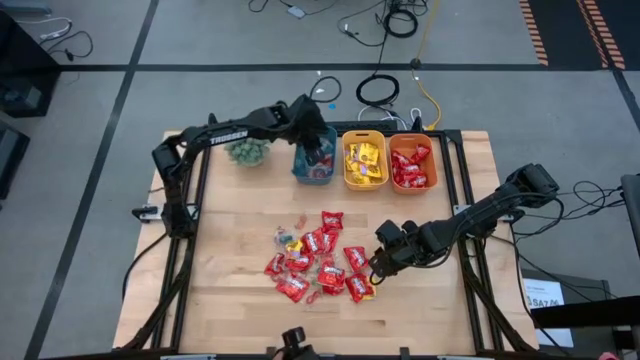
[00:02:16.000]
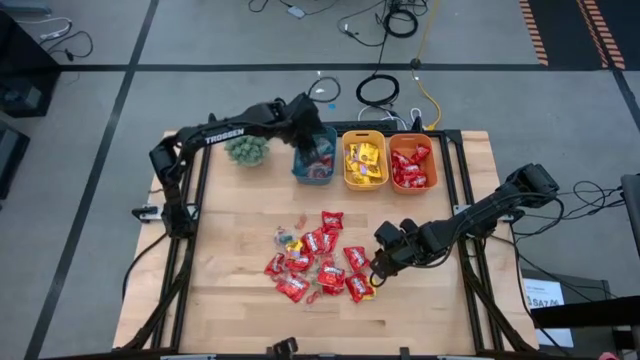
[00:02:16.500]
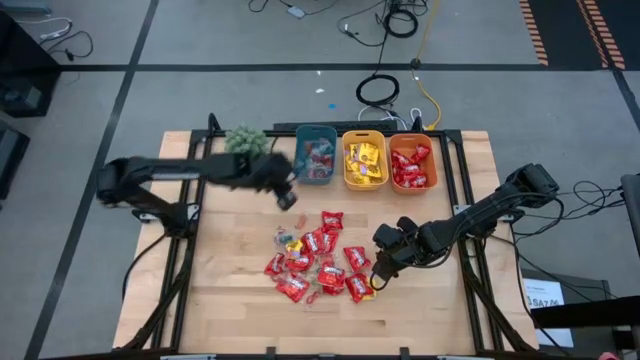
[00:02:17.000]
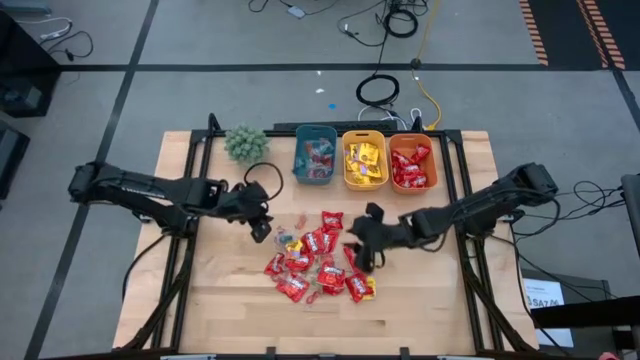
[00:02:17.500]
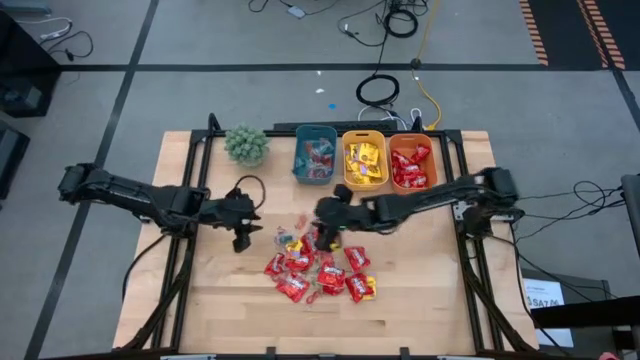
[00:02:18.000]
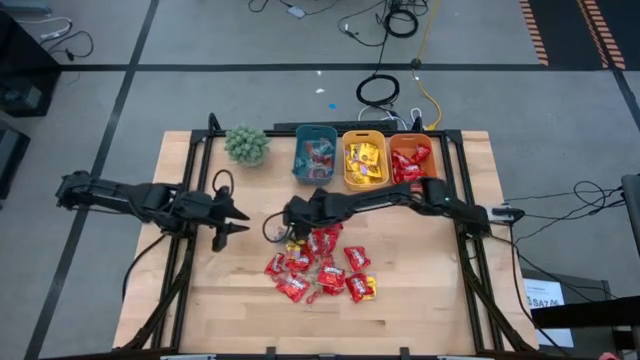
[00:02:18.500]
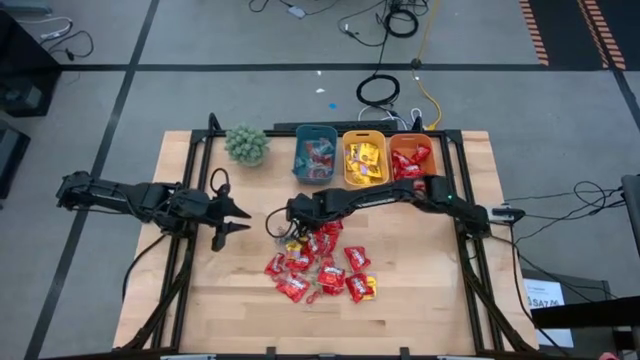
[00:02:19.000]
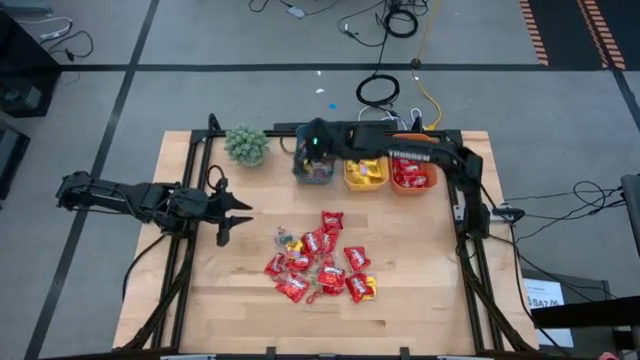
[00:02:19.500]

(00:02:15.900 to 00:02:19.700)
Task: Sort candy
Put the orange gummy into the blue bin

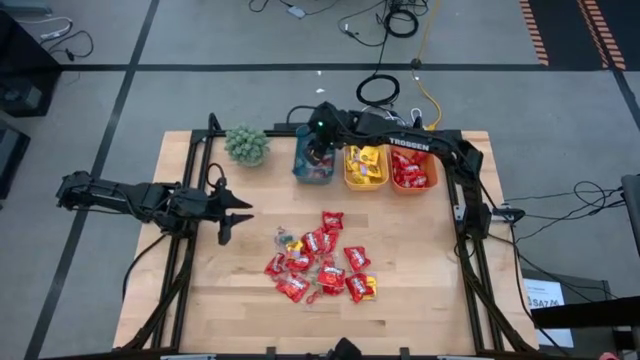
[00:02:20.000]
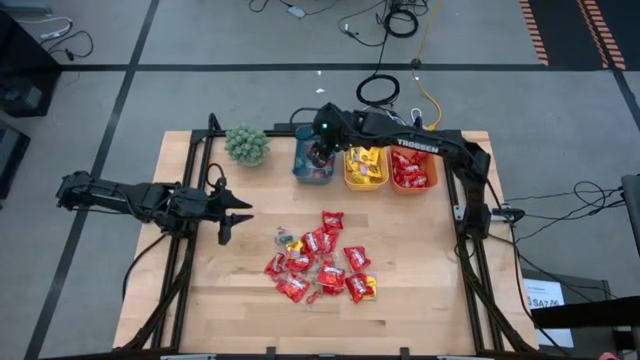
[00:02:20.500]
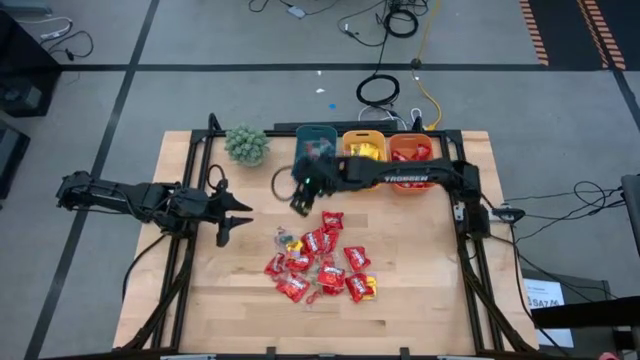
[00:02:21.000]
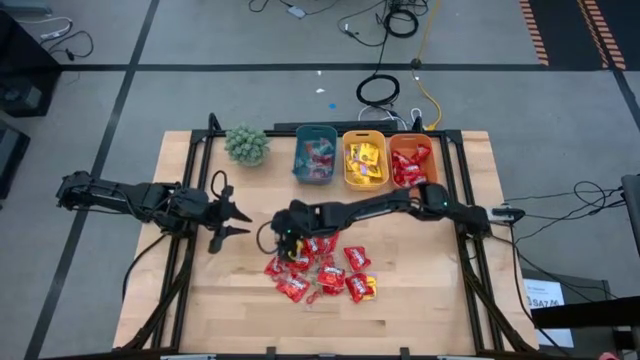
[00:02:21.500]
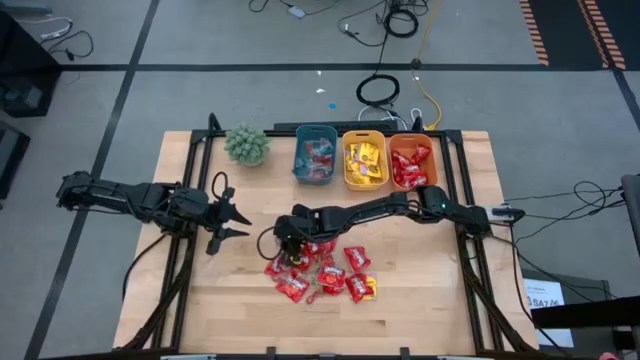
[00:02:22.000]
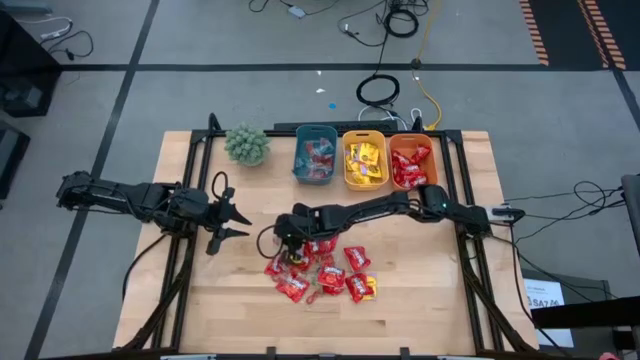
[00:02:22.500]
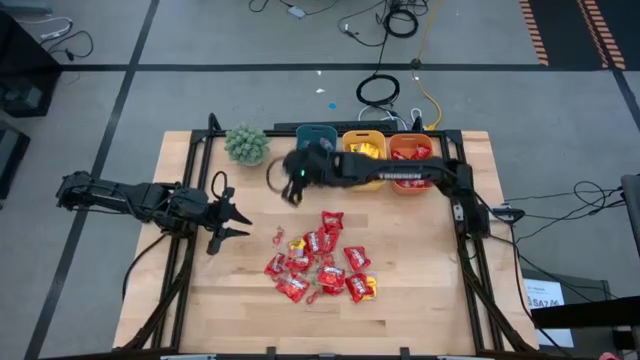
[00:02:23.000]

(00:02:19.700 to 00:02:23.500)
Put the blue gummy into the blue bin

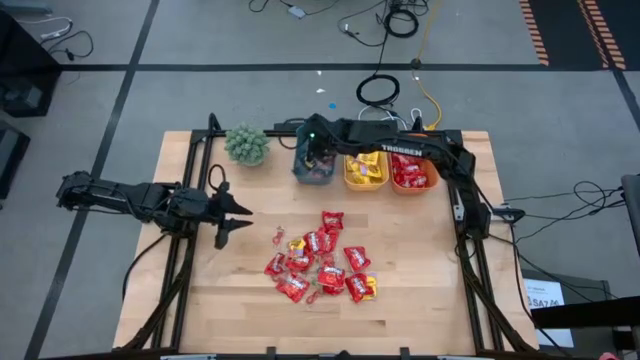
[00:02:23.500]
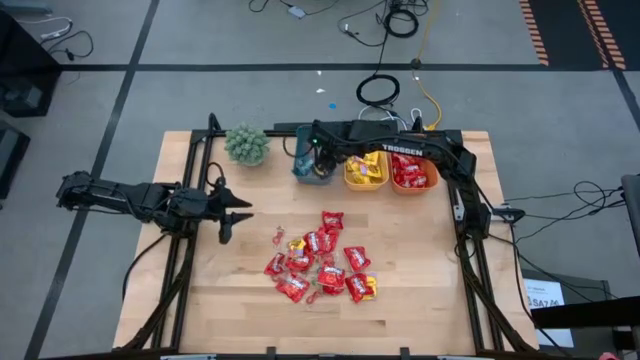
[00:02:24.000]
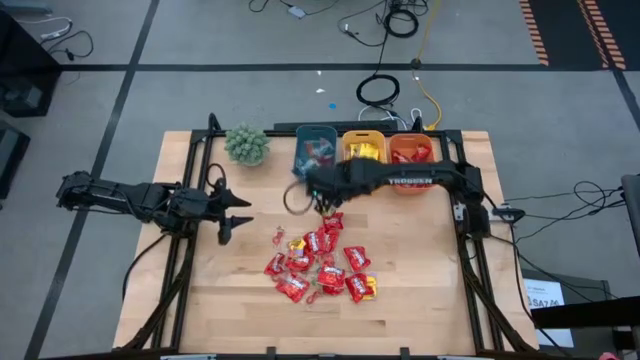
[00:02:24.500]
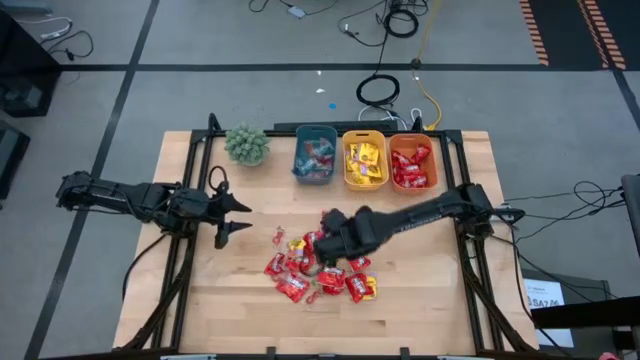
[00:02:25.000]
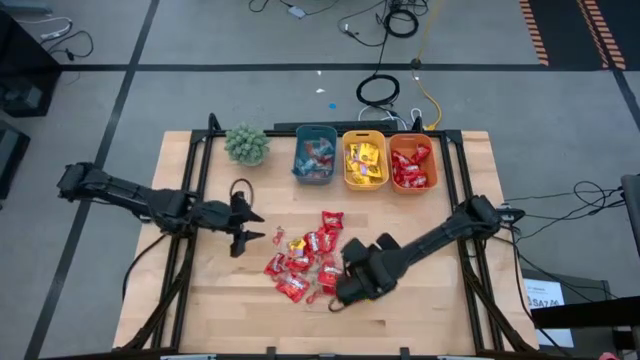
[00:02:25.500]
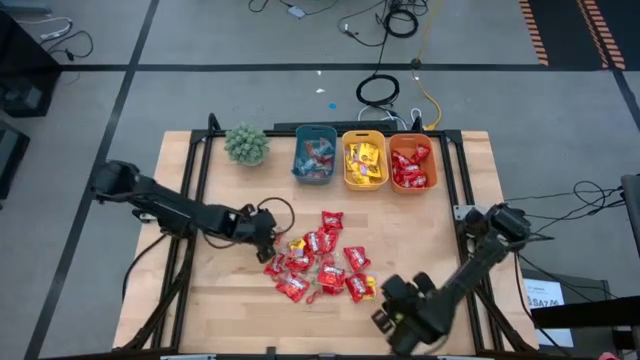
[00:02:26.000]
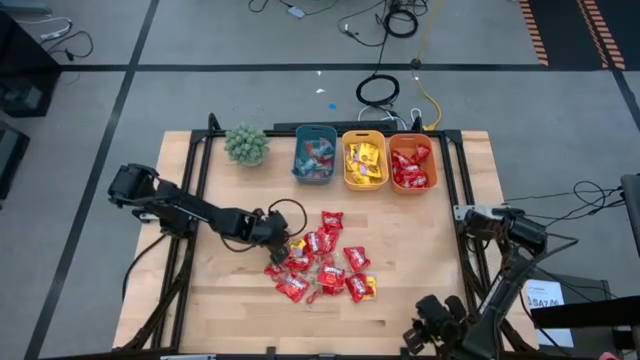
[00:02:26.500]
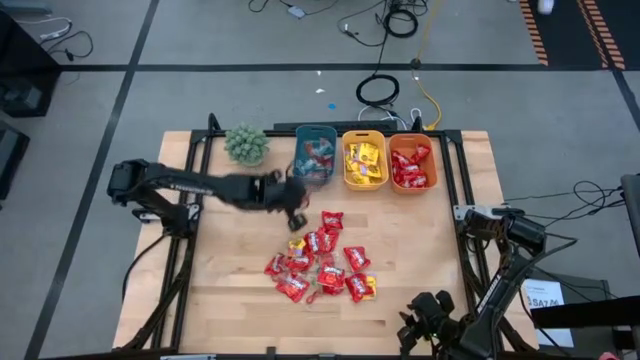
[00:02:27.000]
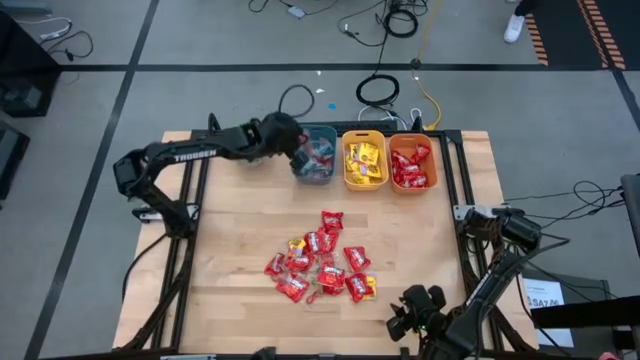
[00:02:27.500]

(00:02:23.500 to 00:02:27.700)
Put the orange gummy into the blue bin

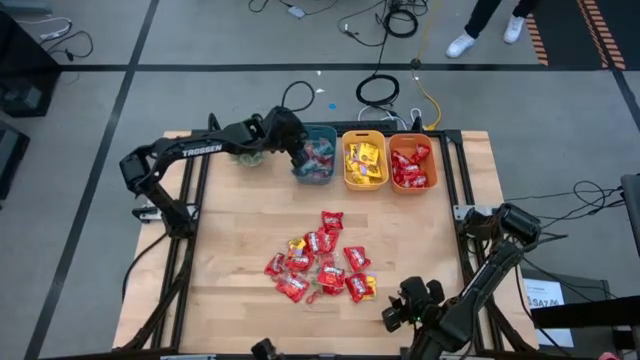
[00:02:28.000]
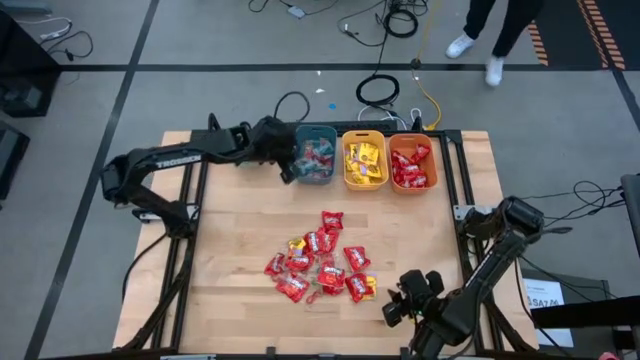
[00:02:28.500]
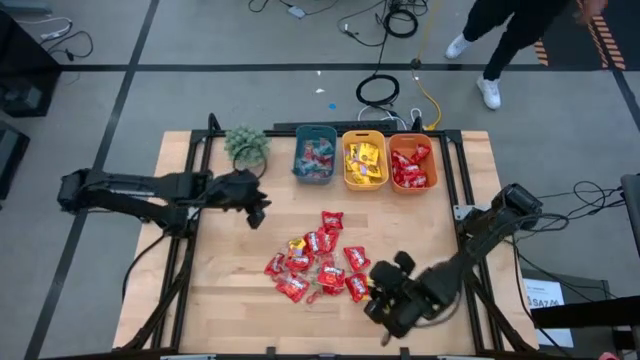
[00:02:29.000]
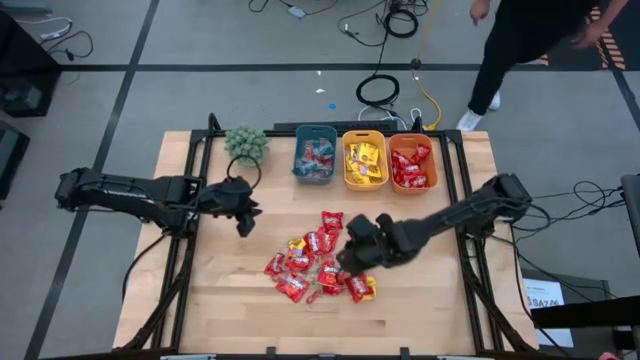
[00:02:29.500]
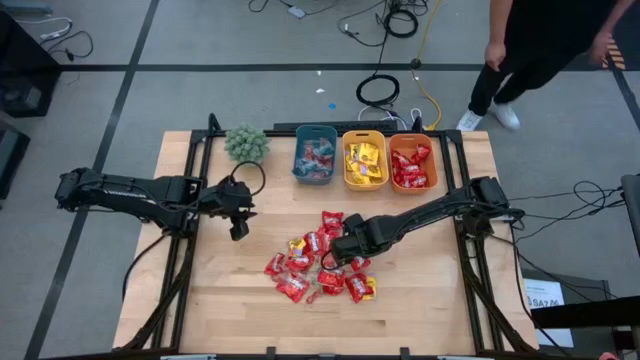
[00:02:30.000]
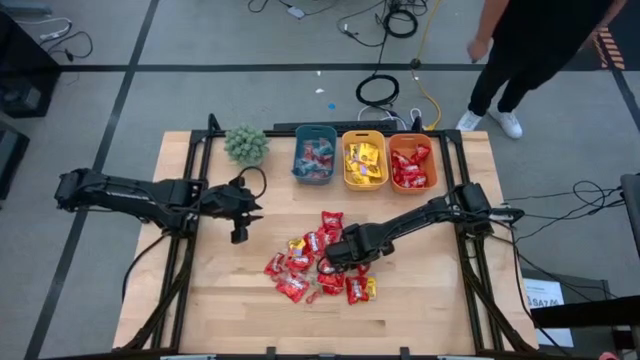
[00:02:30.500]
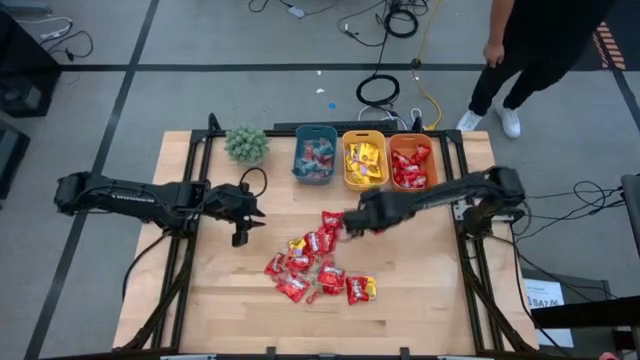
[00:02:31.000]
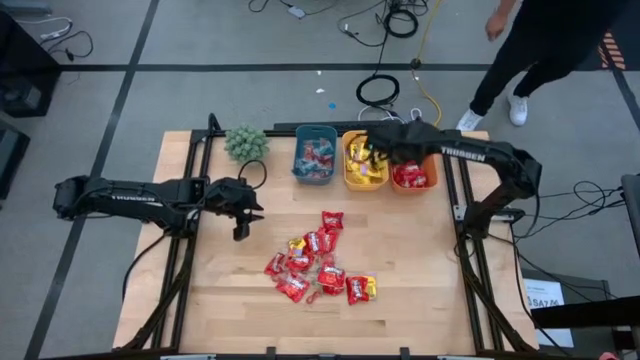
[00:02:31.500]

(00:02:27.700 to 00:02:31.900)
Put the red candy into the orange bin

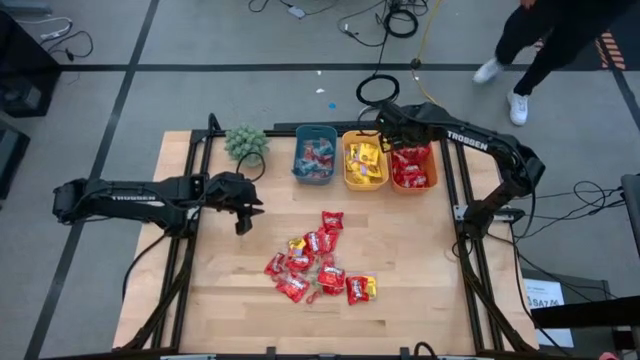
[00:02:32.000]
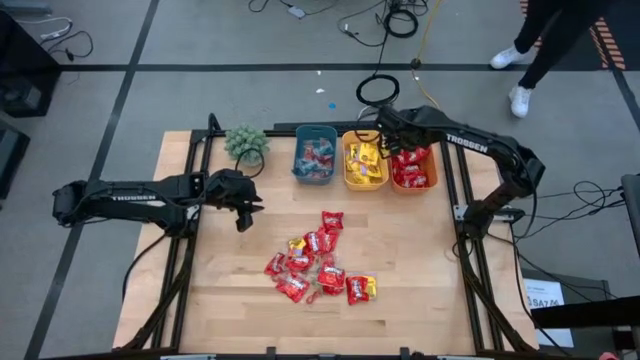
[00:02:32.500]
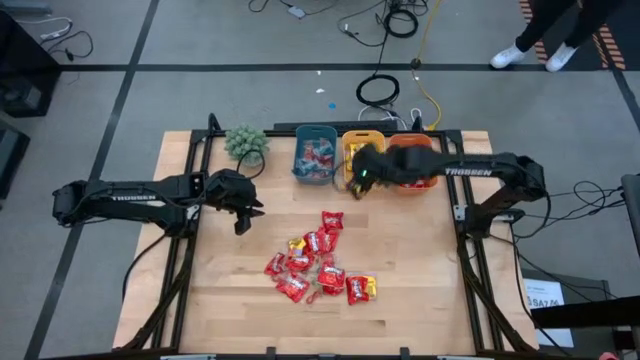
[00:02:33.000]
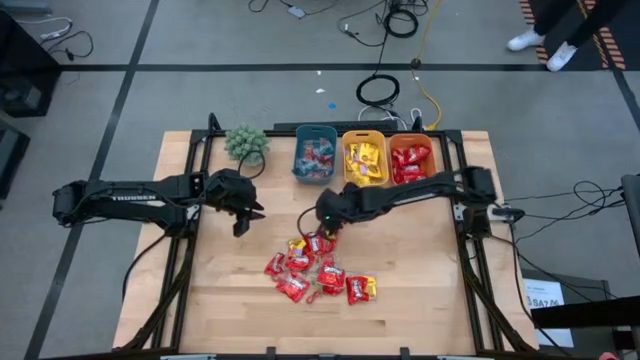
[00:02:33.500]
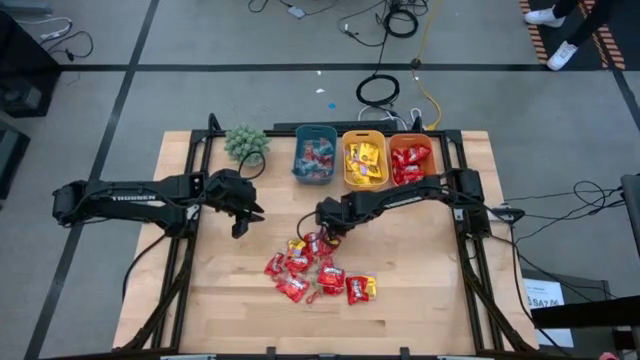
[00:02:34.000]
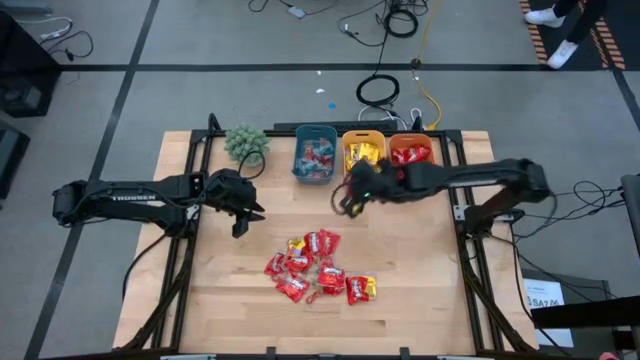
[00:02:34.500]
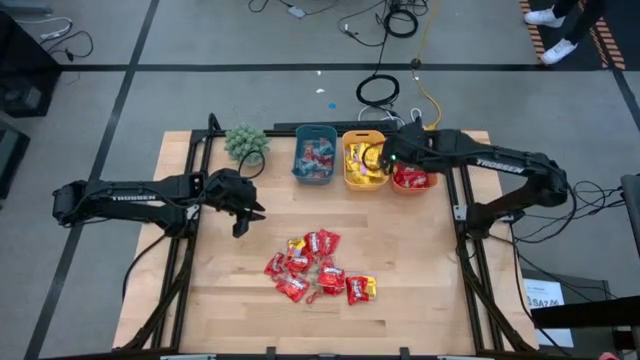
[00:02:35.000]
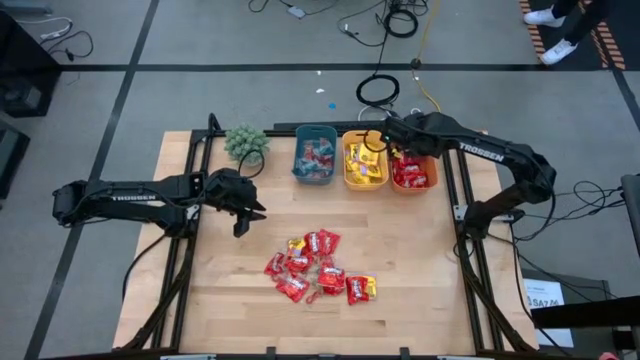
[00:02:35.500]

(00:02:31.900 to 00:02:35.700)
Put the red candy into the orange bin

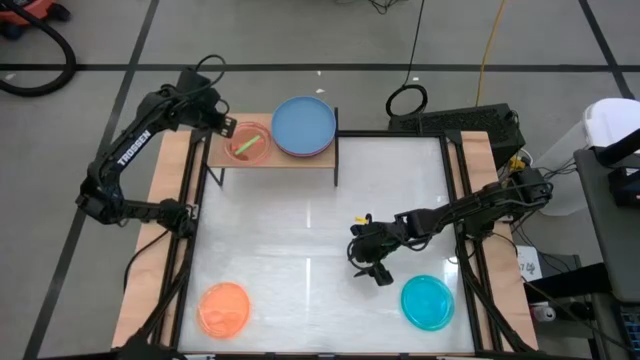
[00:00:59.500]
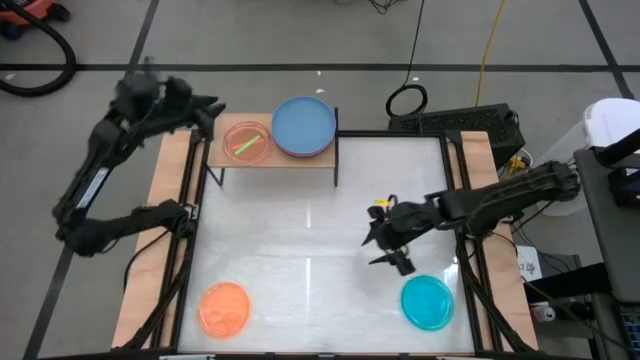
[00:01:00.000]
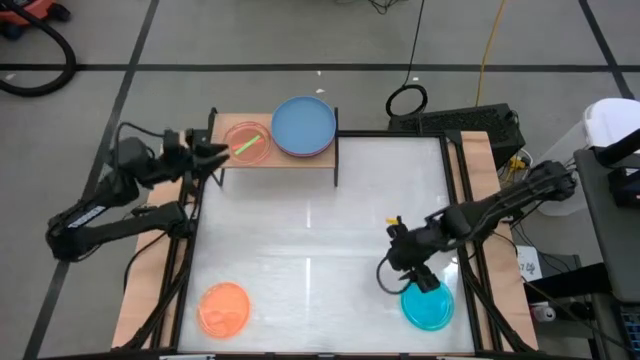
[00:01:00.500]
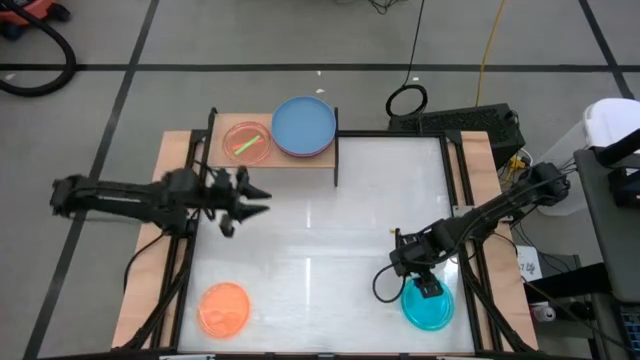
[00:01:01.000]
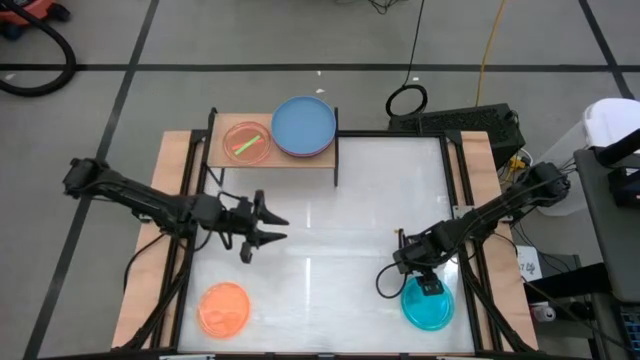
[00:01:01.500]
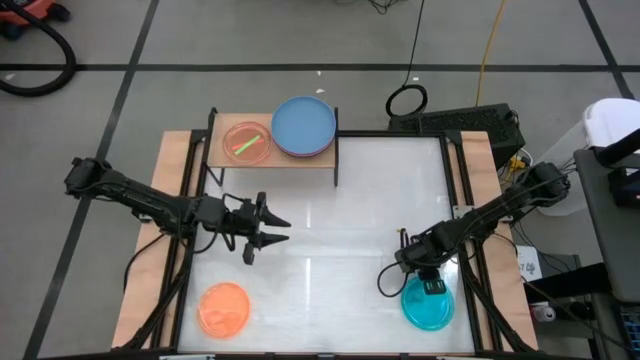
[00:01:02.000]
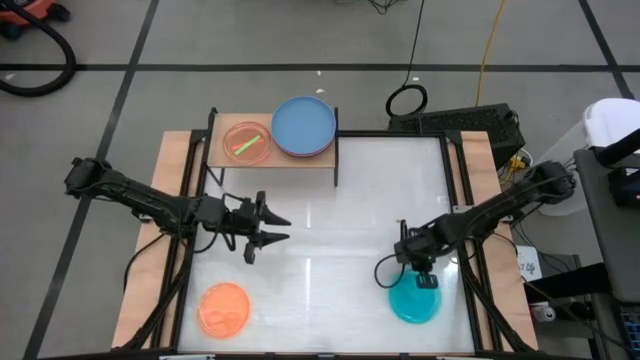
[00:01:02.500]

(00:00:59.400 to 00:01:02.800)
Task: Place and stack plates onto a shelf
Stack the transparent blue plate on top of the green transparent plate on the shelf
